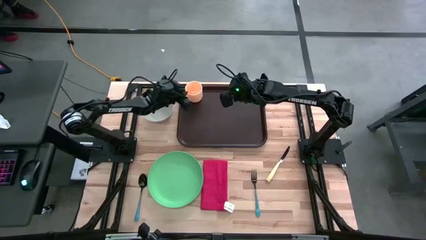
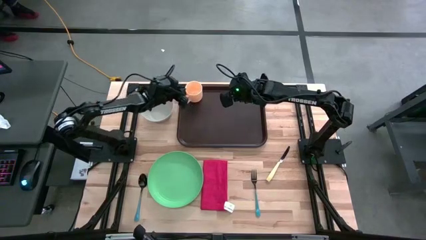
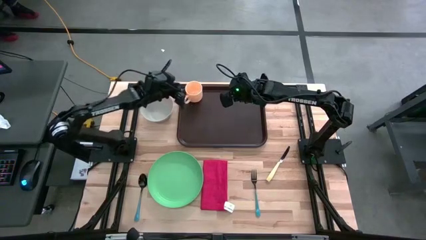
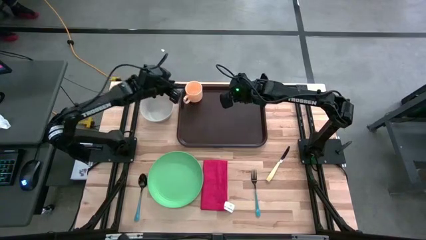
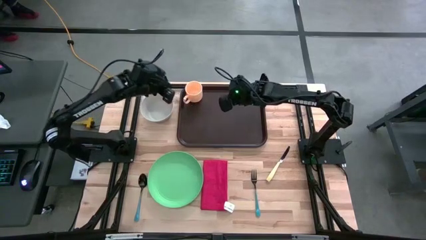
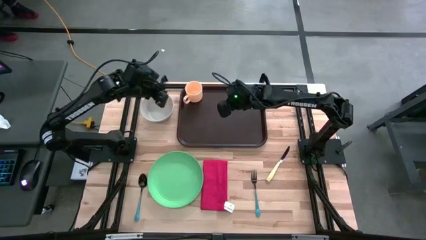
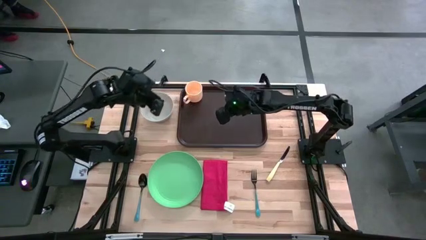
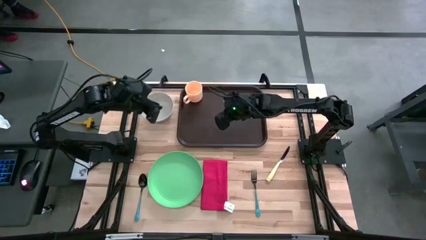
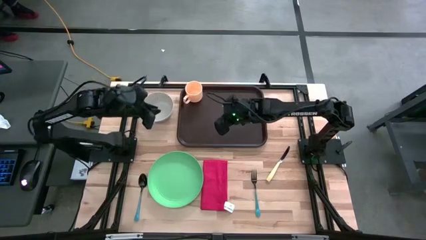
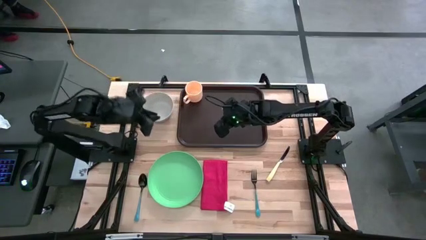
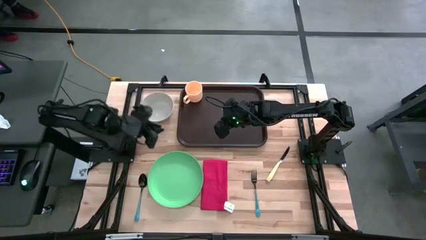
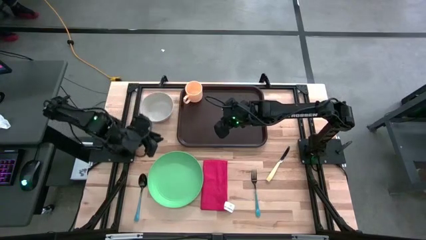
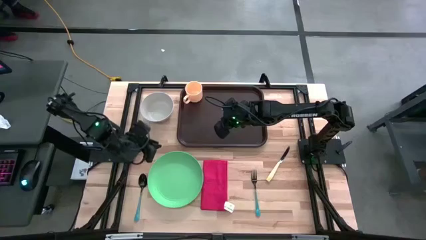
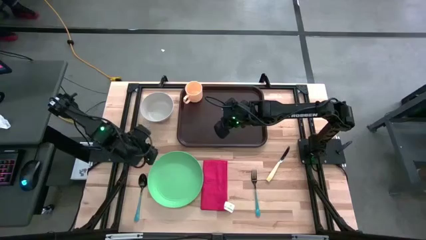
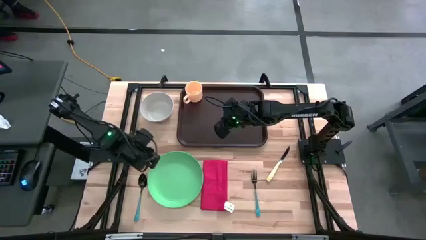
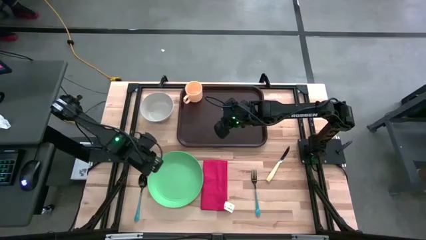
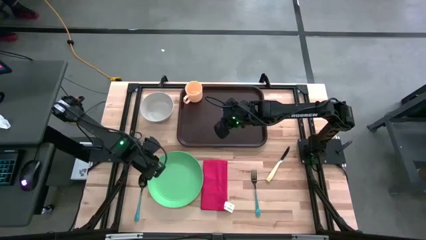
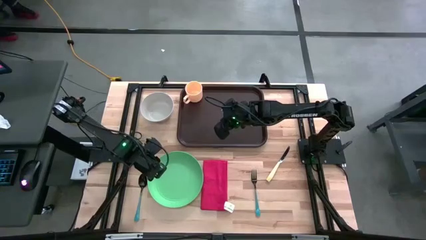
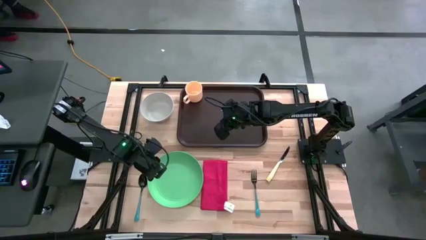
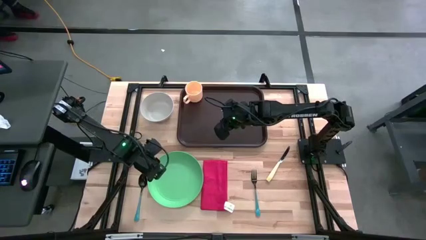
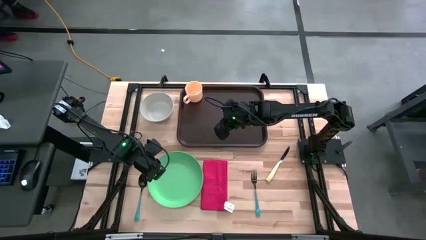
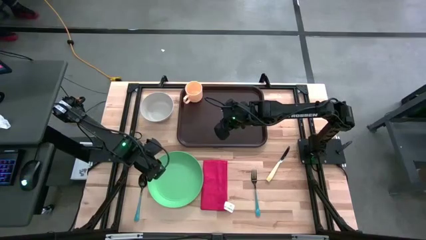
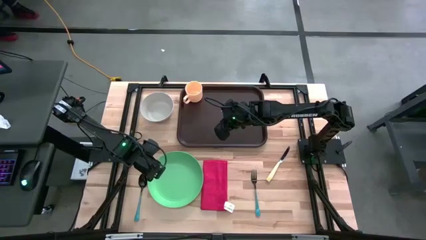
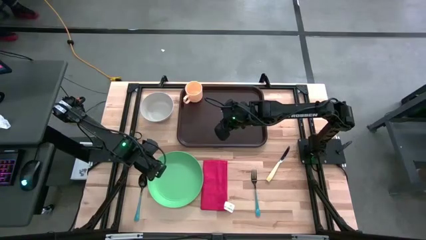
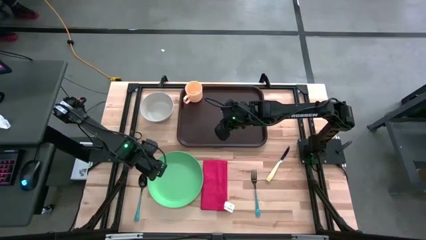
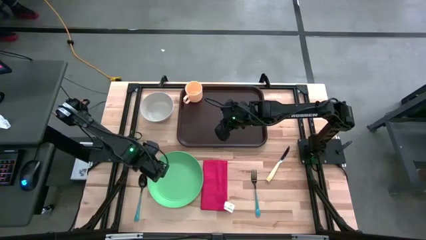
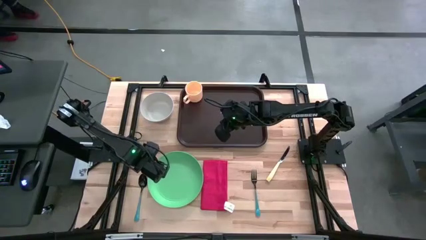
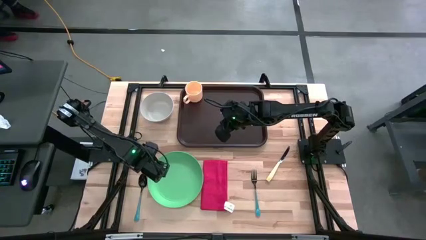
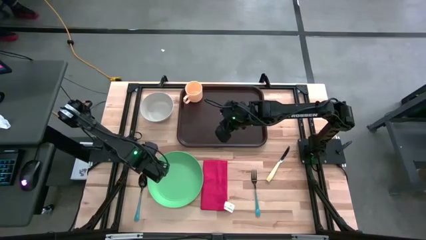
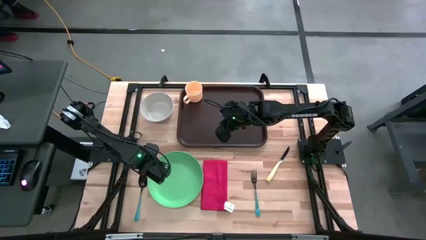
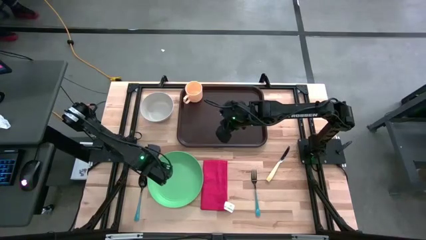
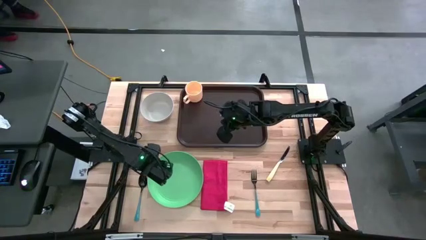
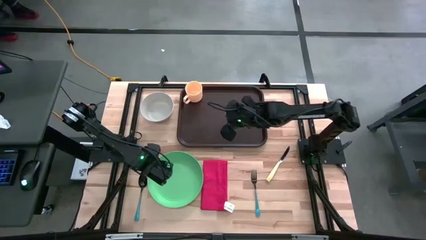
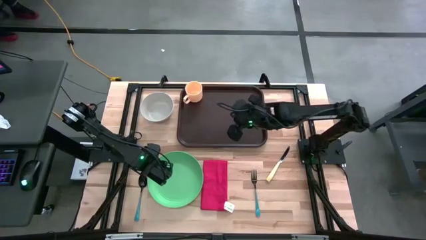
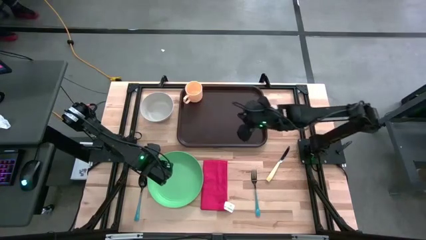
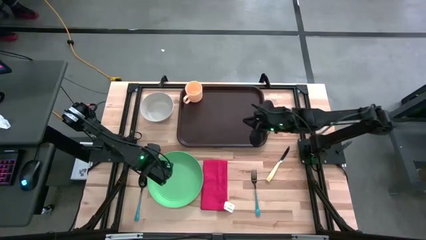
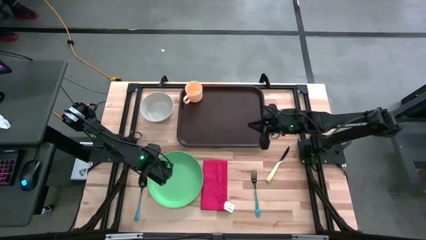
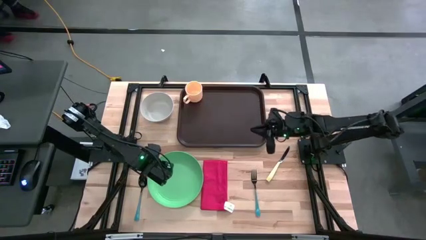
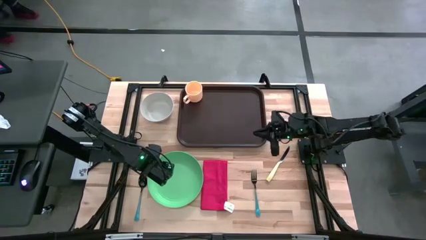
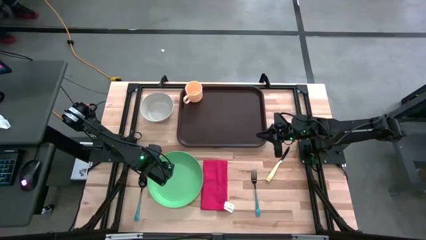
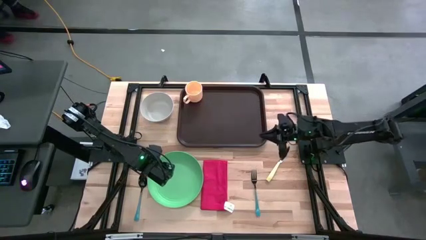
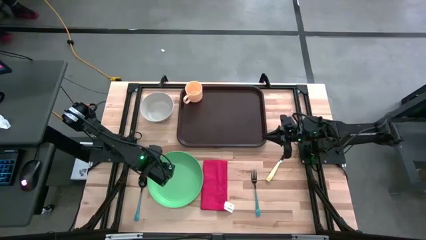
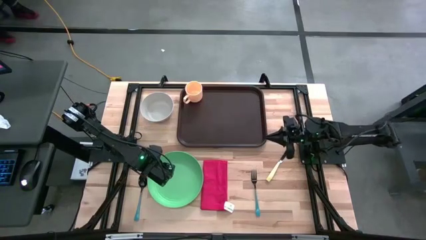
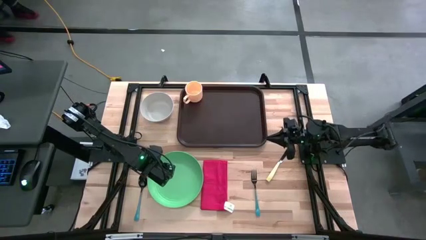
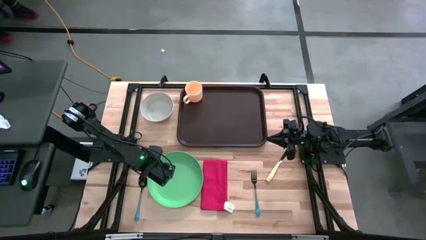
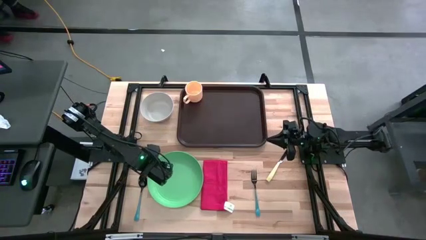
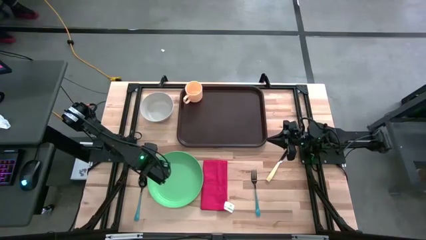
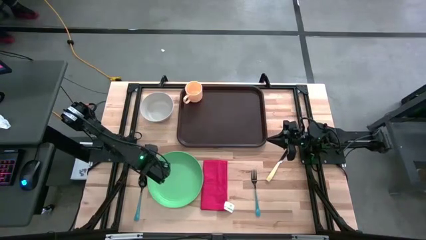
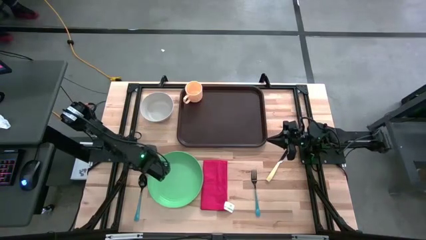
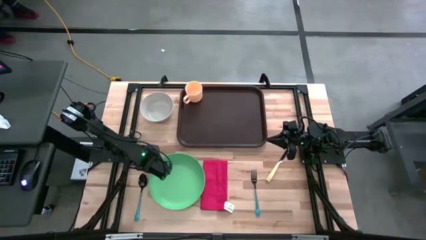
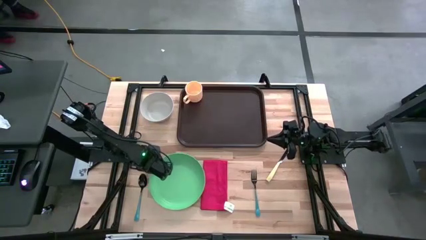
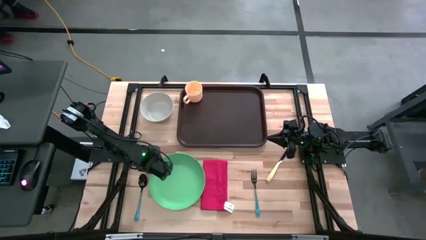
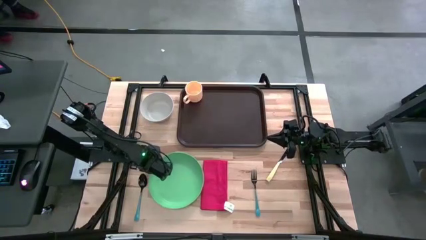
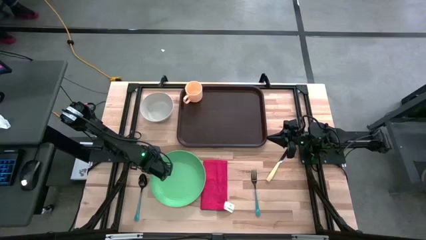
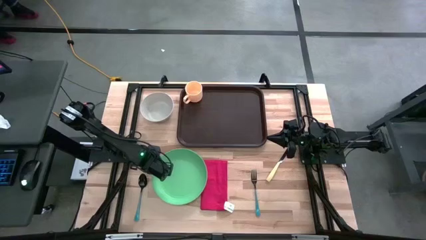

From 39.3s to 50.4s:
Task: Set up tray
Put the green plate on the brown tray to the bottom of the yellow cup

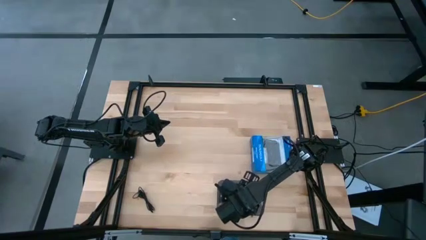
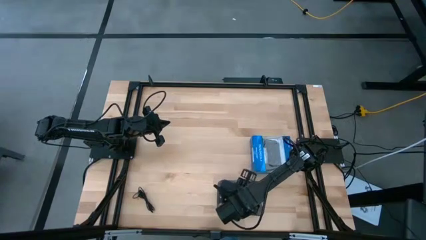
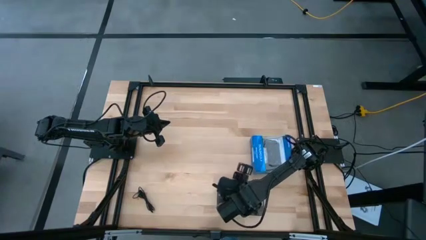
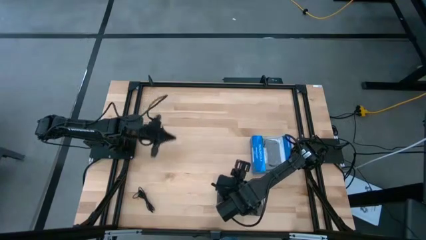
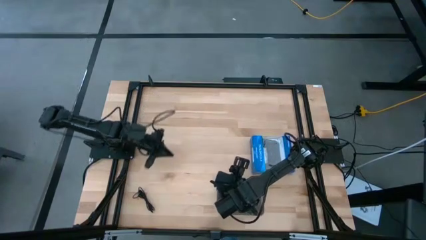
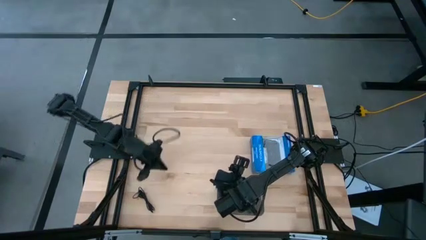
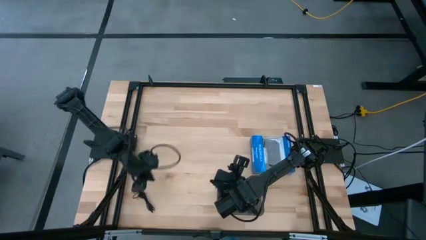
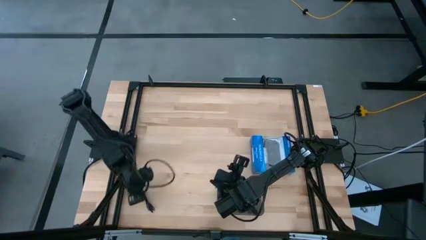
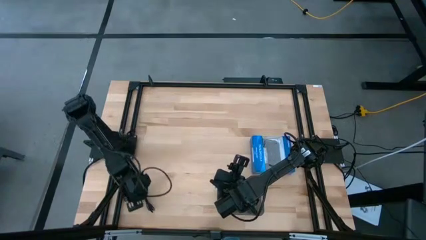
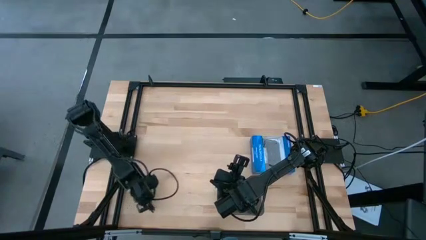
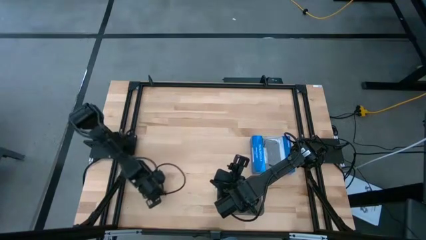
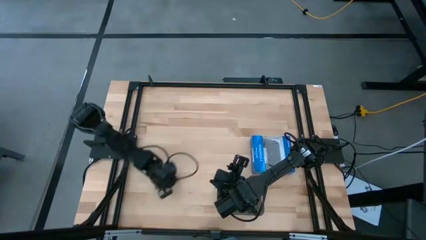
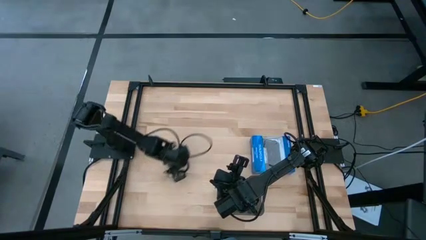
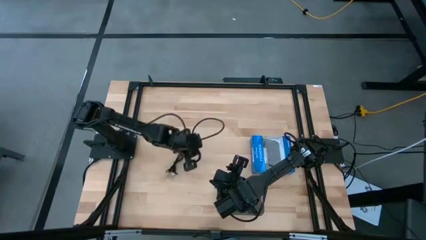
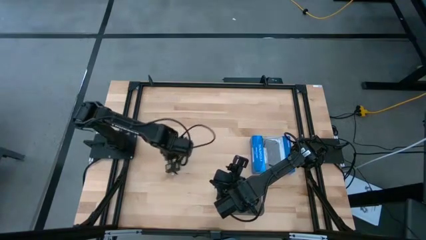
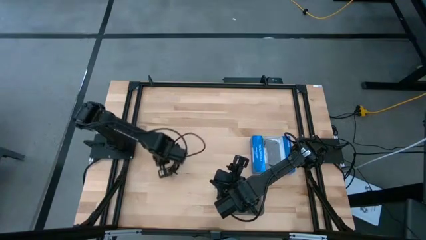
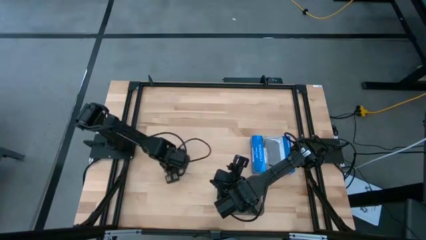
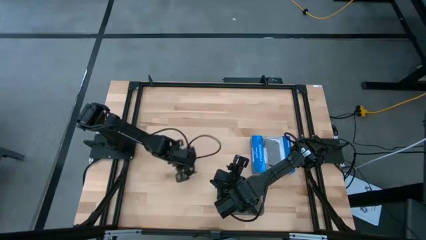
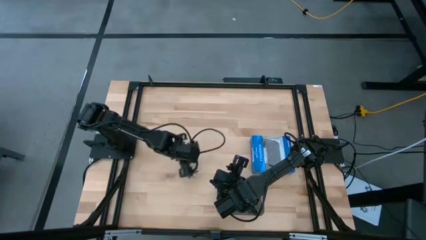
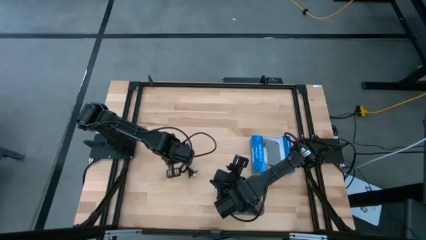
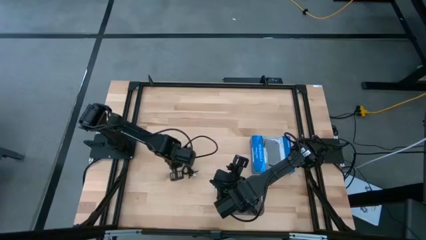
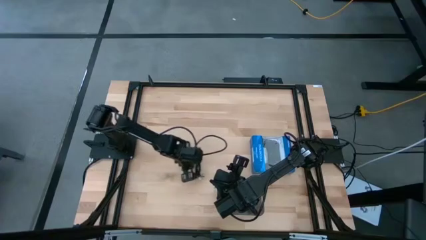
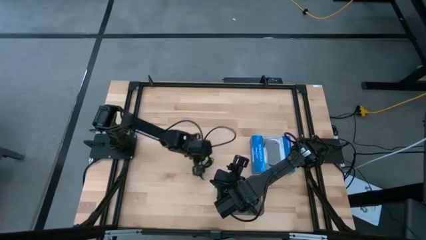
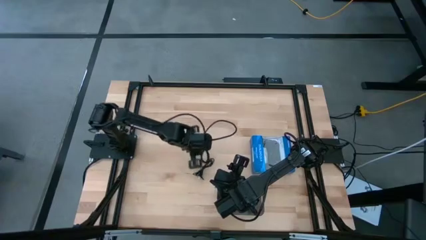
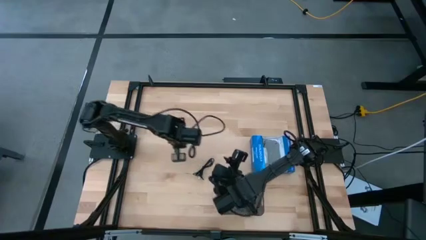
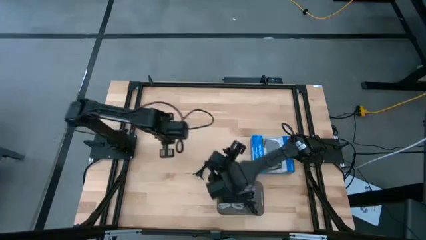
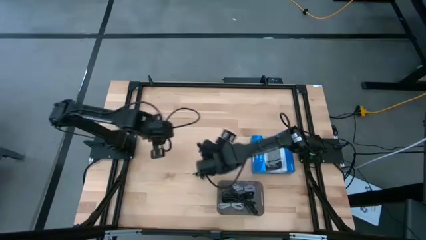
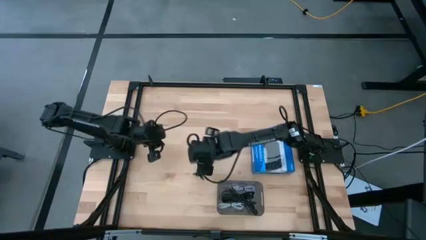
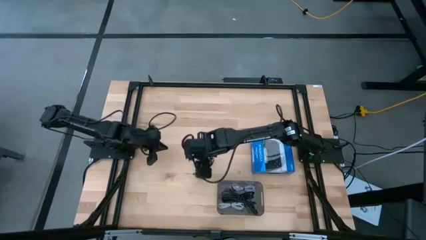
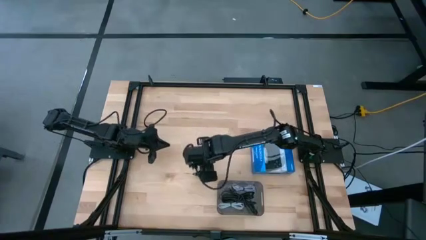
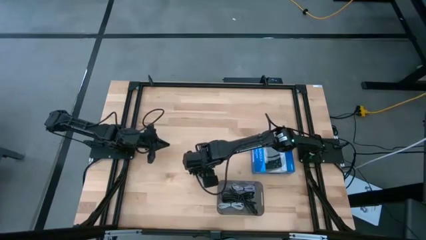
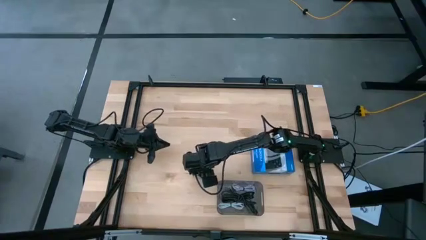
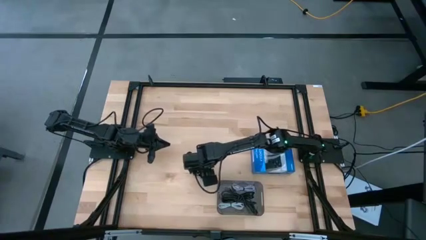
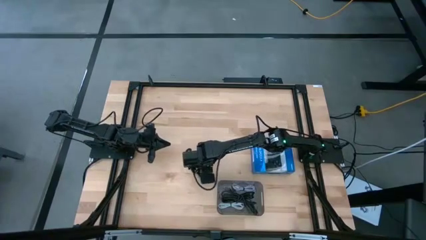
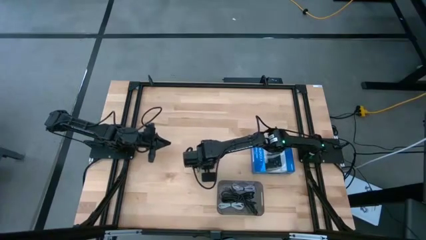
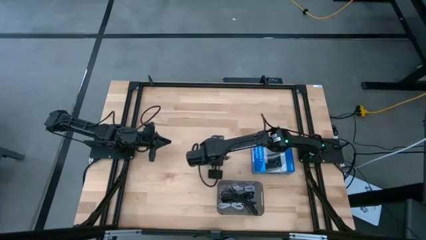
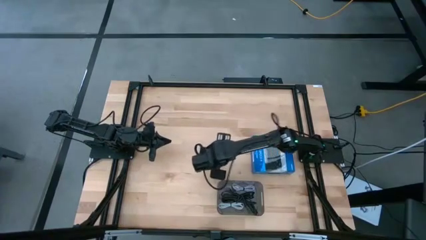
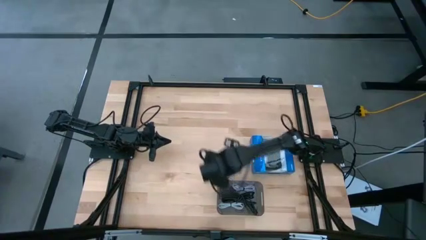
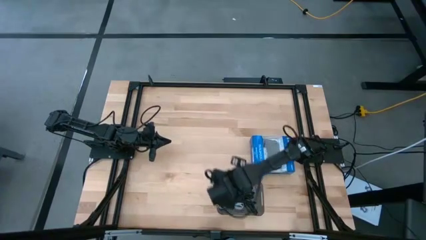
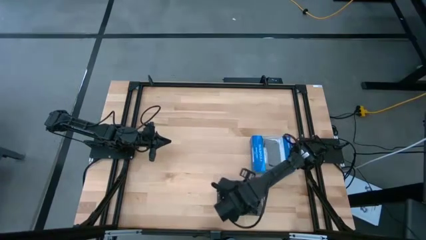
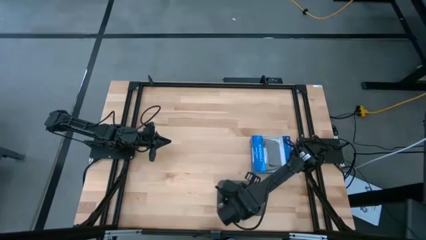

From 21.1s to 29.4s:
Task: Pick and place USB-C Cables
Put the black charger cable into the black bin
